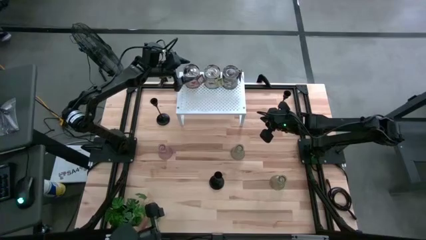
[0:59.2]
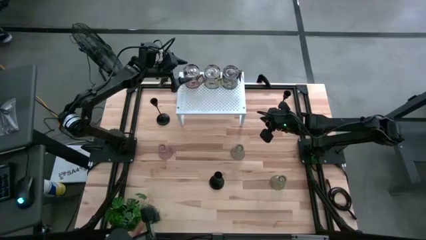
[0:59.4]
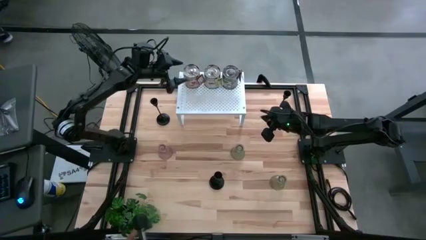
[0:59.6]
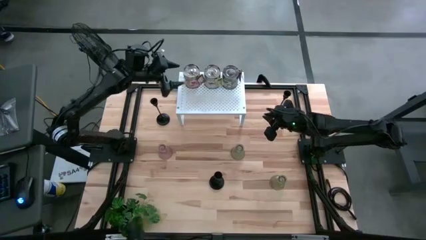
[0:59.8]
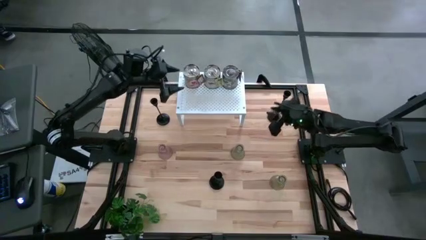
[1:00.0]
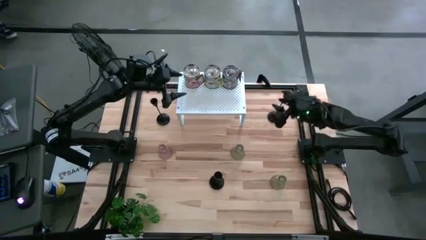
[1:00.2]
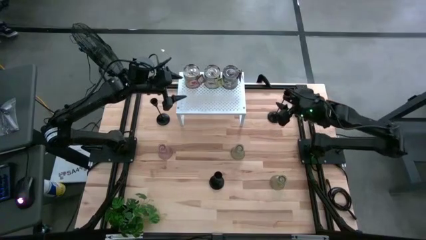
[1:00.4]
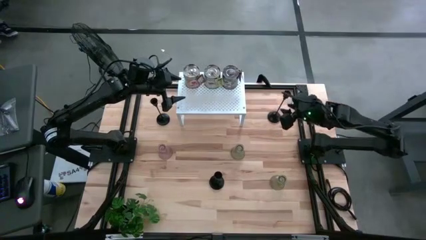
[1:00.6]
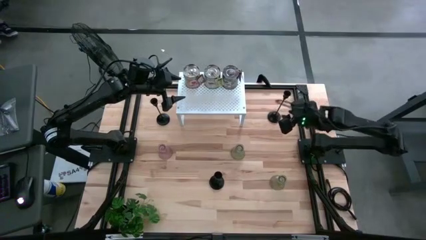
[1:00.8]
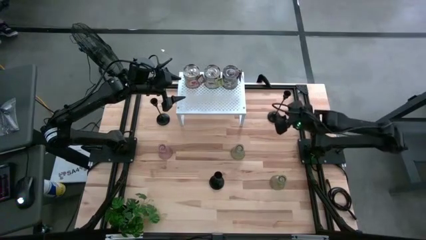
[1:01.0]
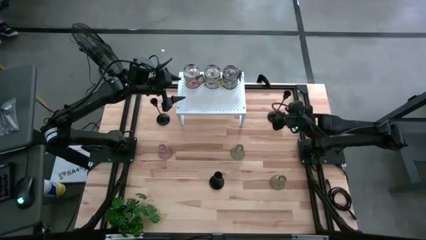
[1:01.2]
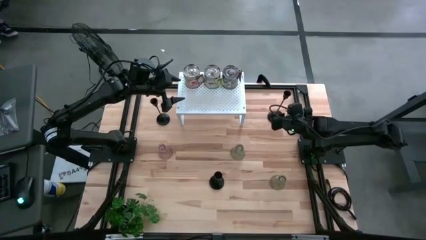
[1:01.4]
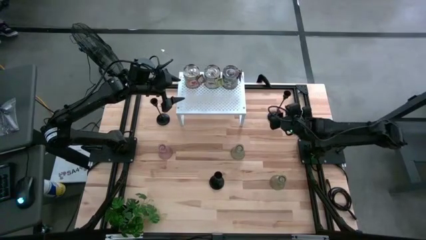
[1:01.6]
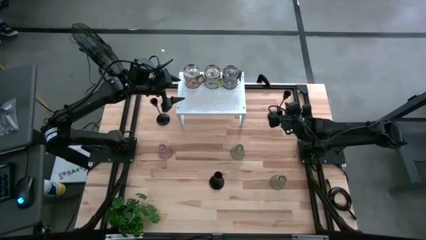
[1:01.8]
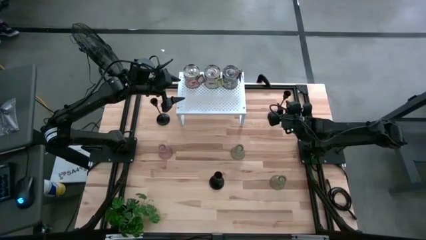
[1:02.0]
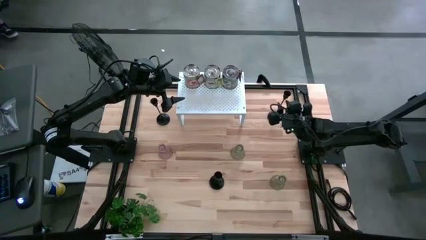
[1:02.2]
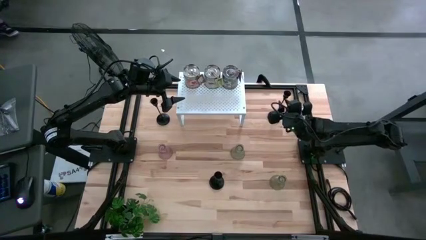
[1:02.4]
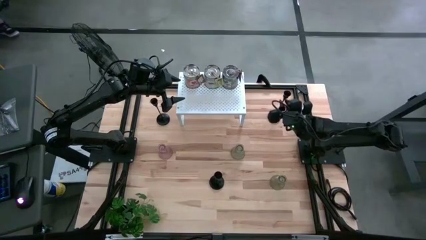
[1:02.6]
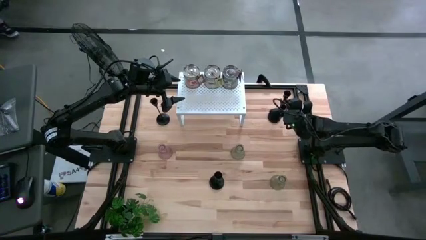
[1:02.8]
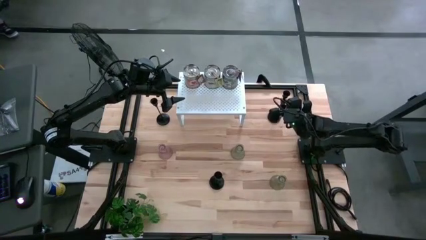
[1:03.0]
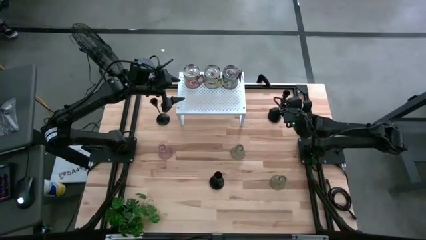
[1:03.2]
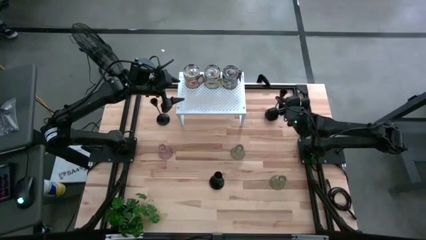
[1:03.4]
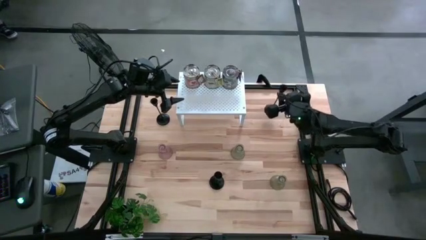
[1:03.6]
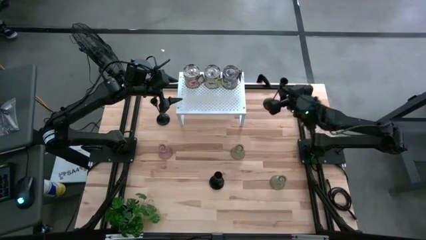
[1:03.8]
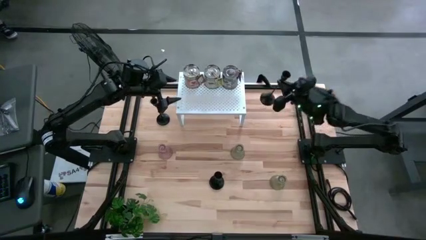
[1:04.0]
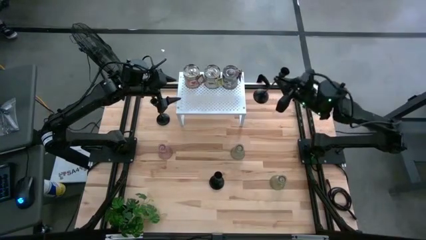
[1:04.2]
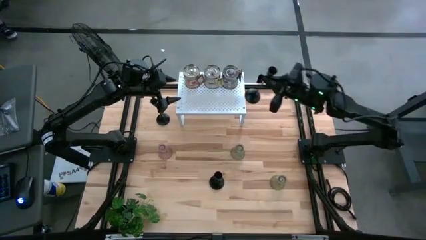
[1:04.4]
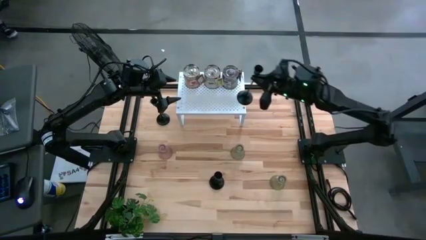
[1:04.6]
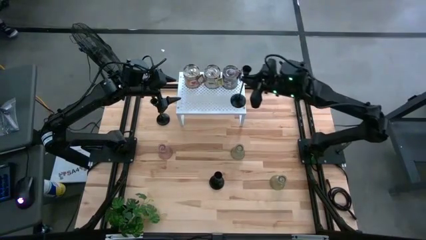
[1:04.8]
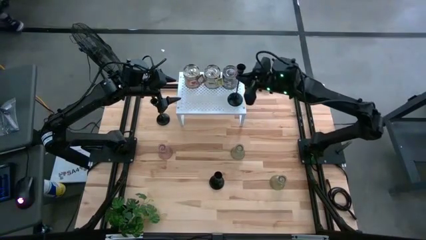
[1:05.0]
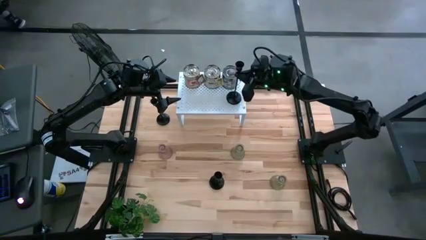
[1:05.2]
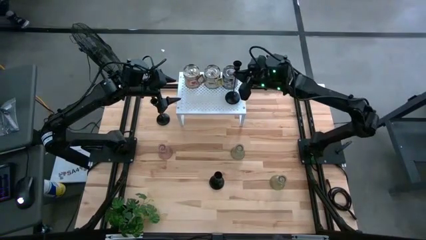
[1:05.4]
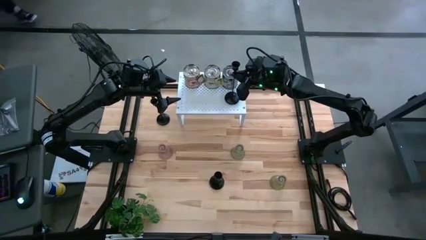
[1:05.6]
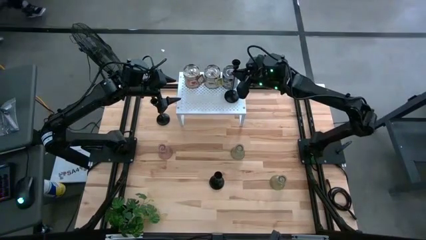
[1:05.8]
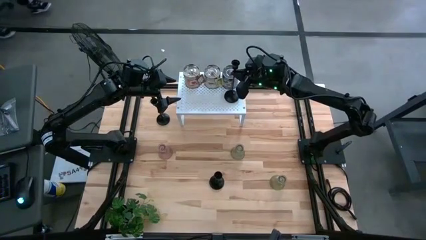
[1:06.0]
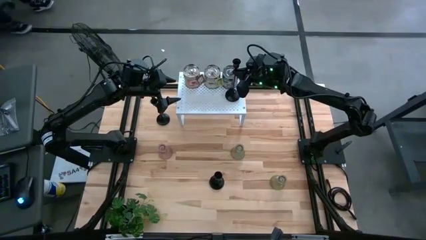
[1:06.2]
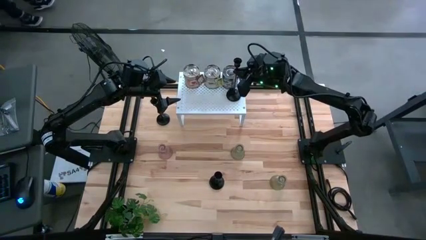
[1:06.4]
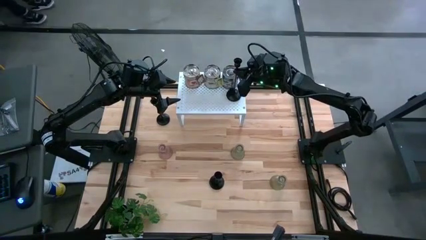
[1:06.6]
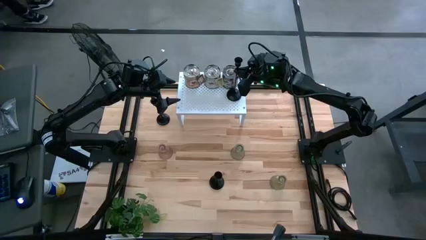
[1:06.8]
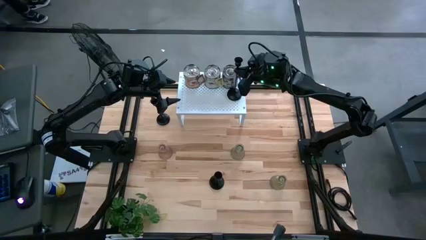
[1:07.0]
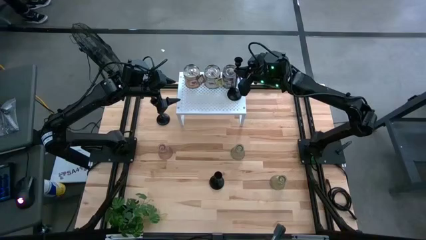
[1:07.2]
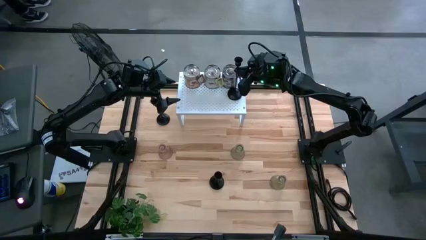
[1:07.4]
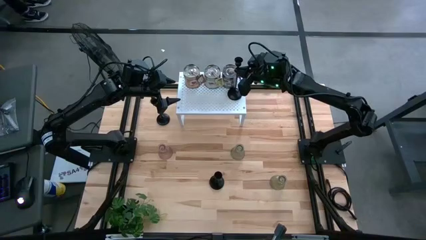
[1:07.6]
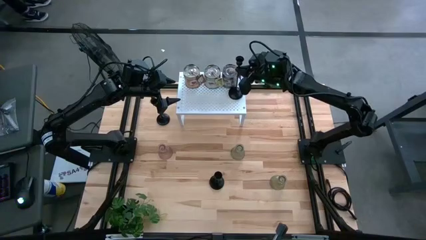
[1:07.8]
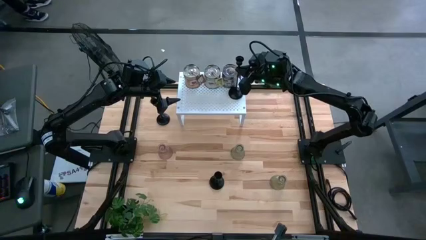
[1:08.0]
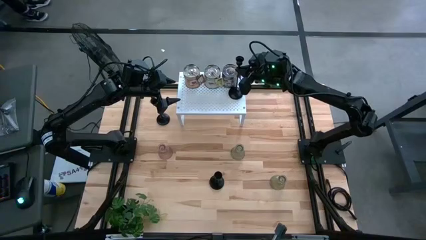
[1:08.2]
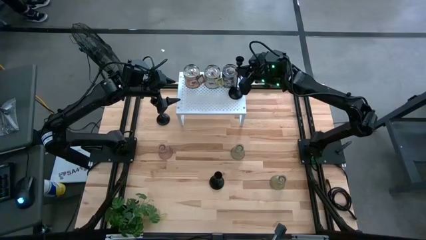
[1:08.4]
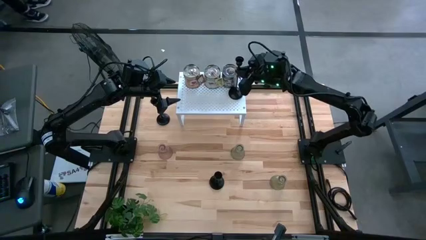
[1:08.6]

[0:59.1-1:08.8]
Task: Pick & Place candle stick holders
Put the top right black candle holder on the shelf

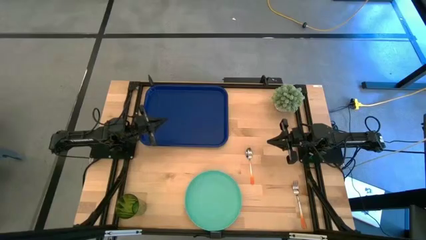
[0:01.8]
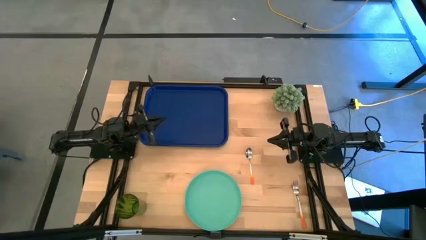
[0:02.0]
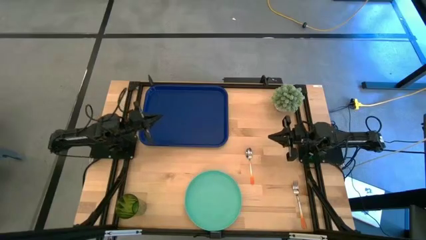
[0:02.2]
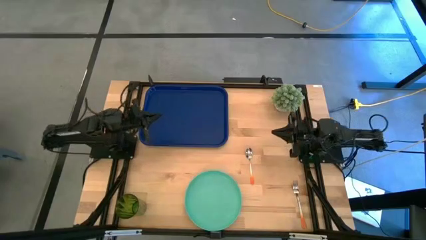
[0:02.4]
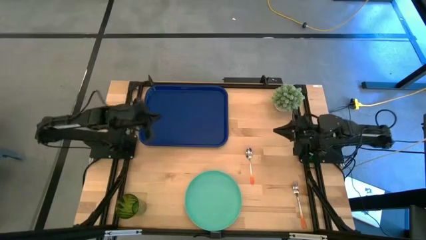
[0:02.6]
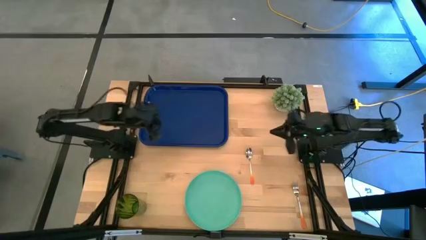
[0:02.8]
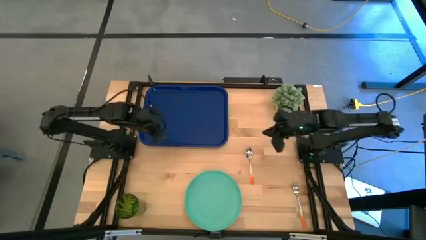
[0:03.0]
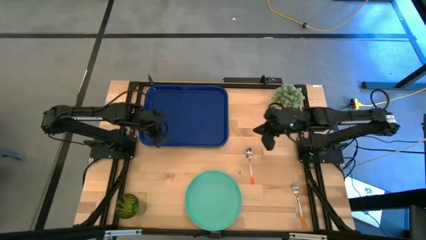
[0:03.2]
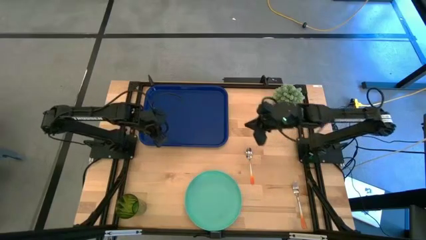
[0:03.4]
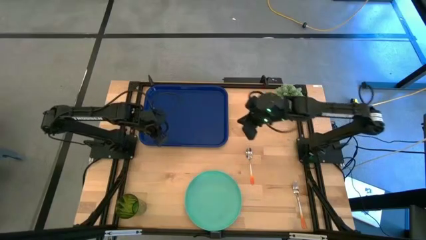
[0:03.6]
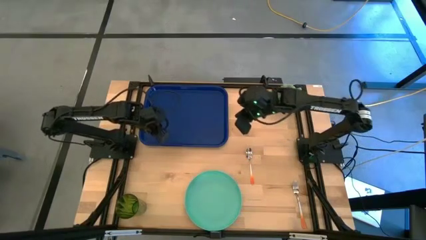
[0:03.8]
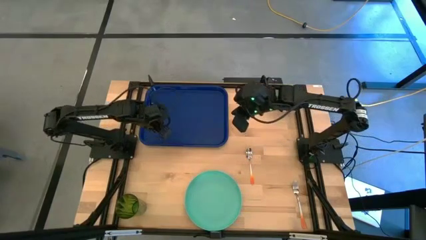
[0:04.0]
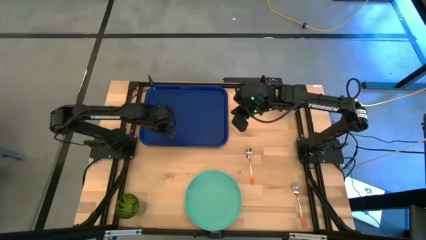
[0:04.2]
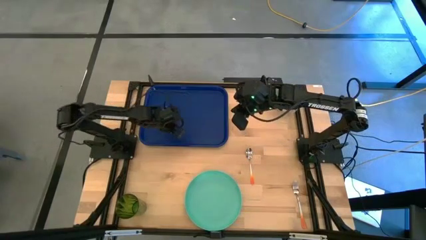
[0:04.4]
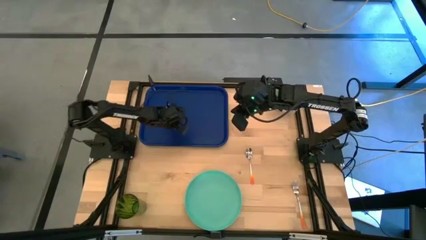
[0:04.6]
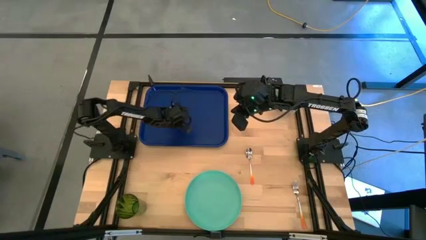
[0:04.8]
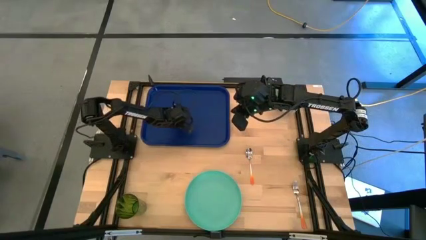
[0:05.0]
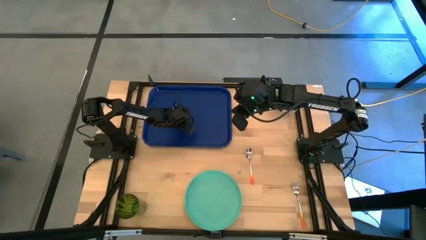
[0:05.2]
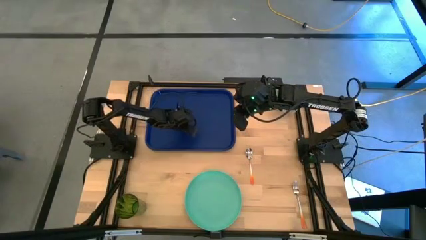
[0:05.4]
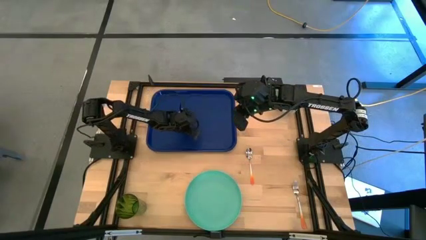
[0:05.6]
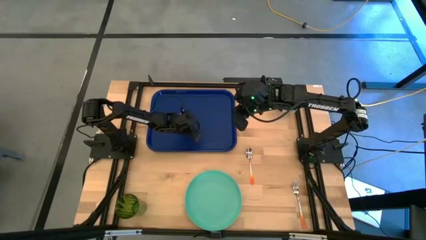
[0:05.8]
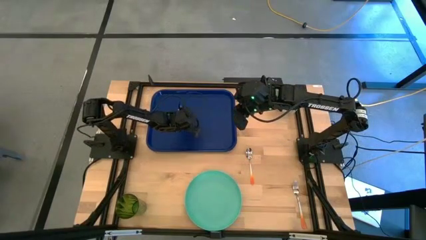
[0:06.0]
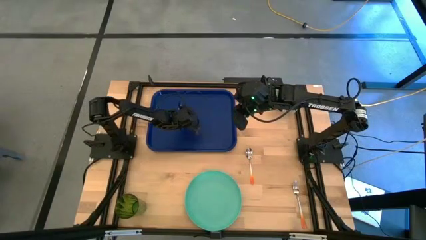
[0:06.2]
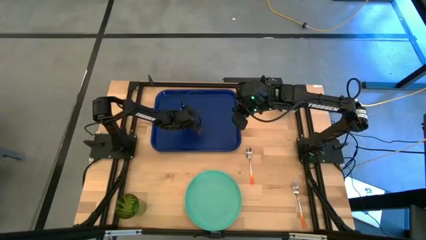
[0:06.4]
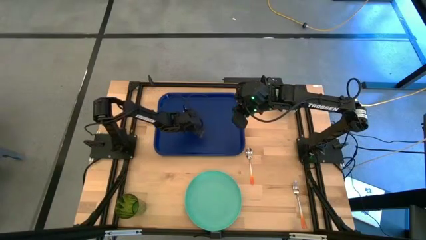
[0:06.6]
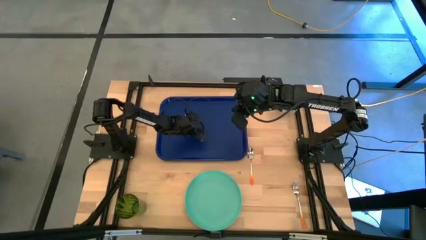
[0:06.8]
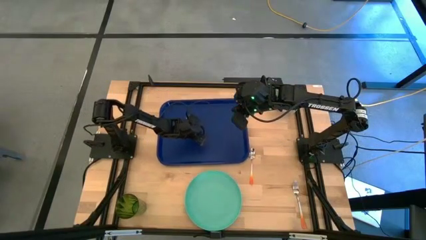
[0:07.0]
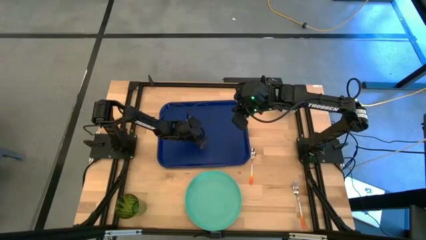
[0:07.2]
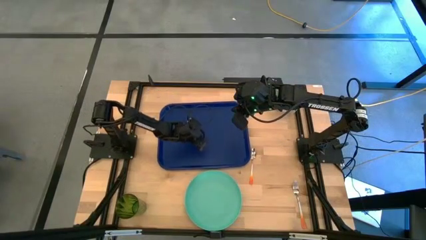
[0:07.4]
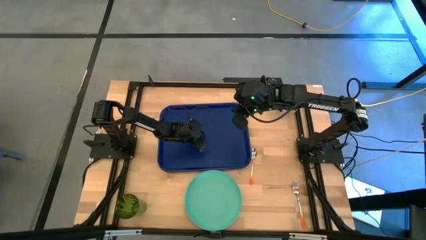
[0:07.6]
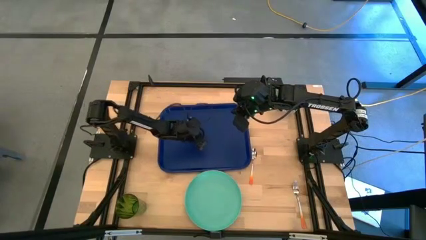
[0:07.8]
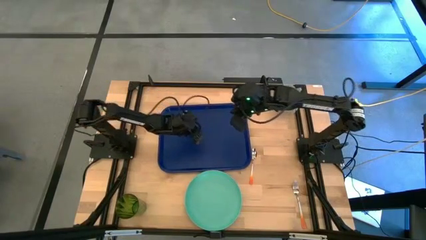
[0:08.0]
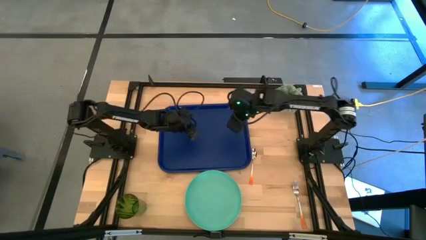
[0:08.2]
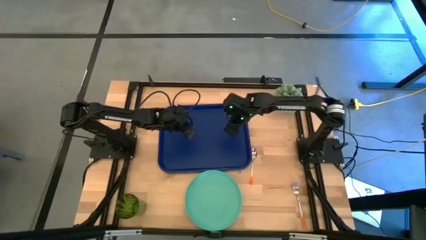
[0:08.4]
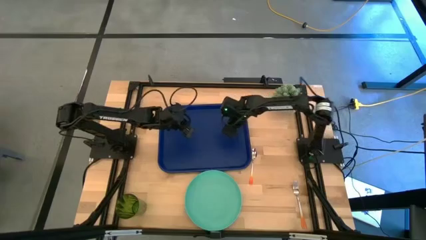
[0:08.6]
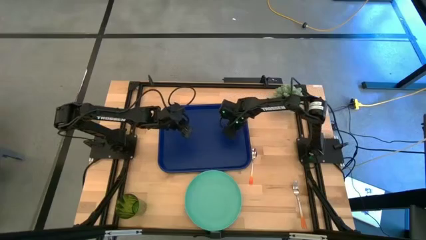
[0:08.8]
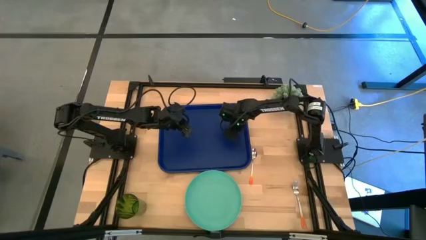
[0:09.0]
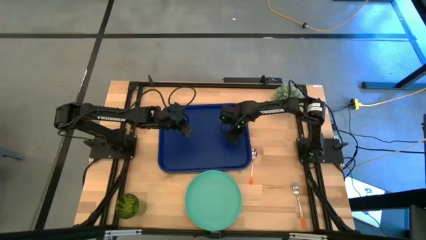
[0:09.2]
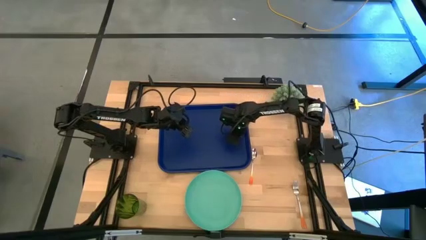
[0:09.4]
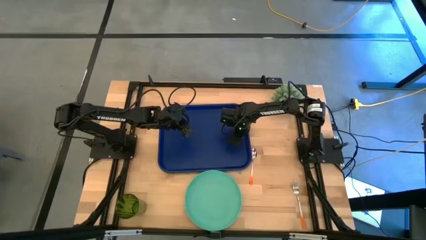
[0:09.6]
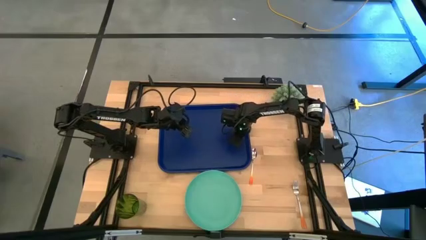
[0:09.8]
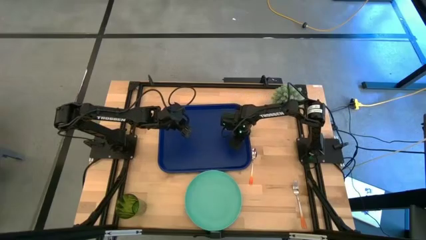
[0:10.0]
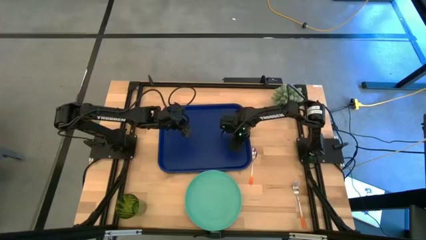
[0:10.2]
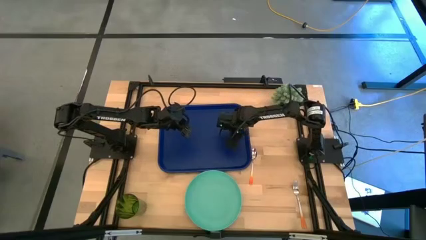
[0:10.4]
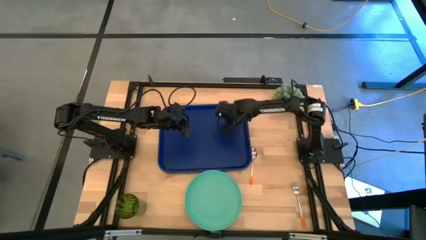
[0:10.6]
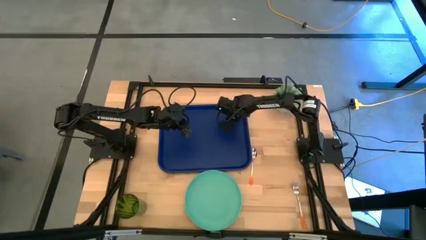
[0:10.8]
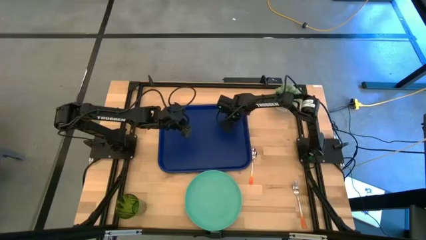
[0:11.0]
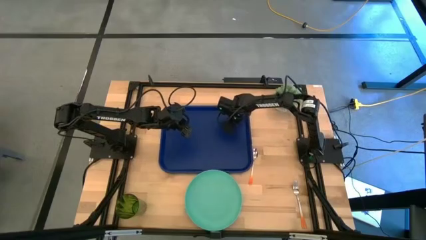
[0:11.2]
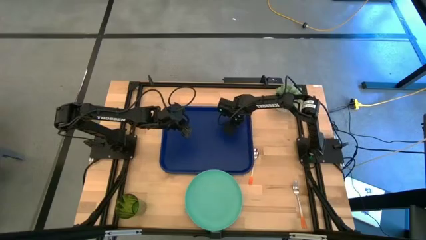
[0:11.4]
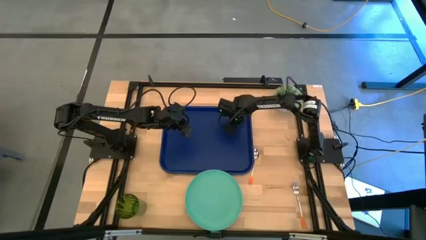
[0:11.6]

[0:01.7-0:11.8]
Task: Pick and place plate/cup/fork/spoon on tray
Move the blue serving tray to the center of the table
